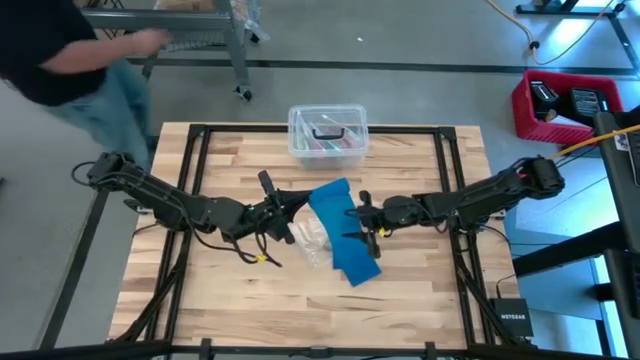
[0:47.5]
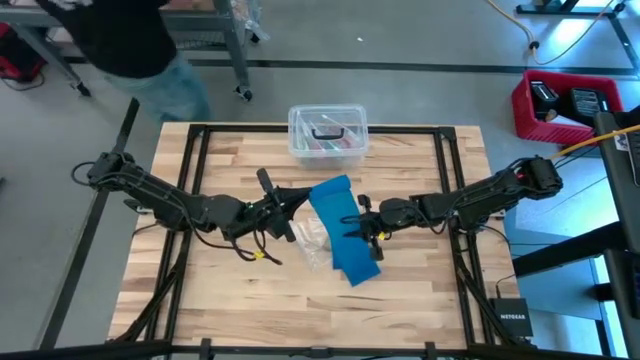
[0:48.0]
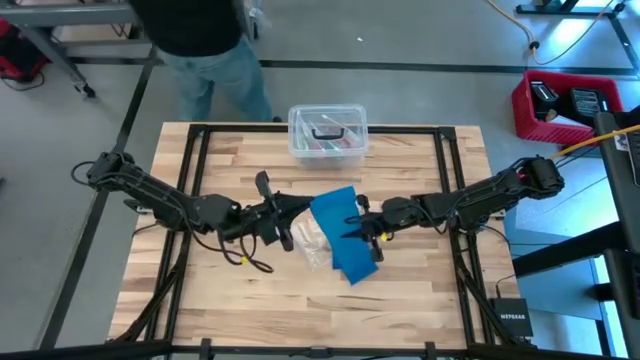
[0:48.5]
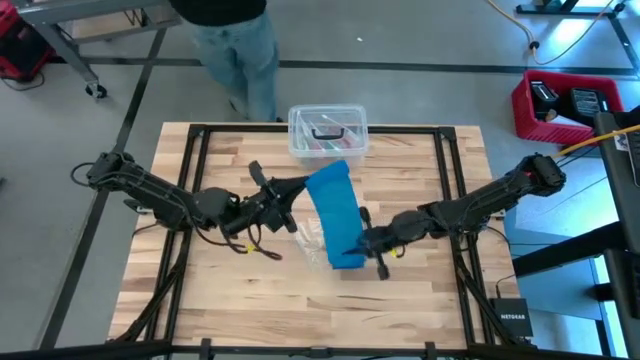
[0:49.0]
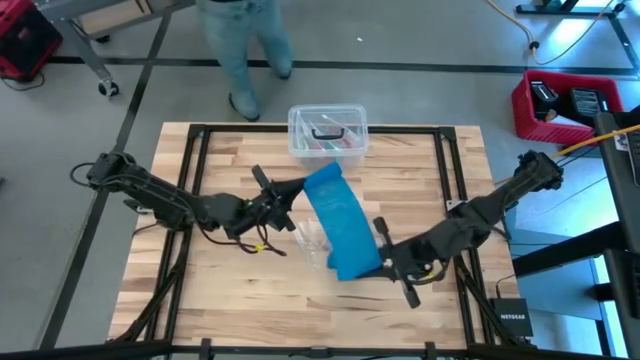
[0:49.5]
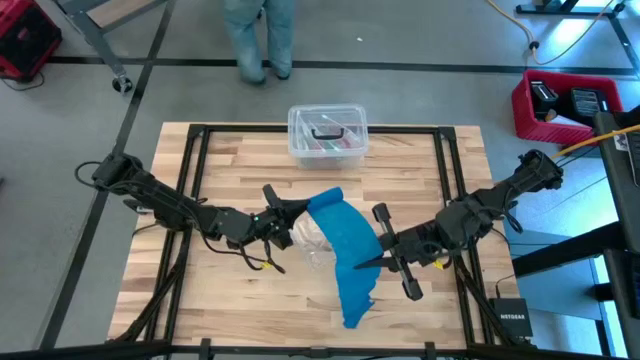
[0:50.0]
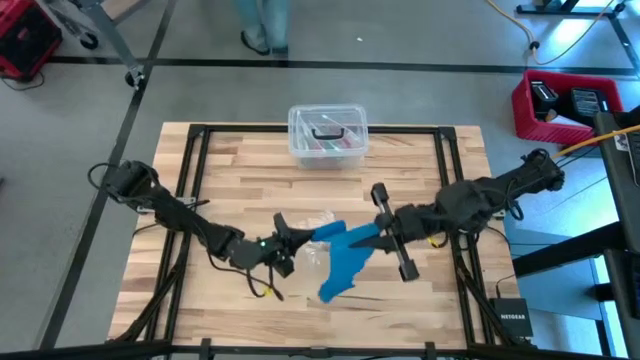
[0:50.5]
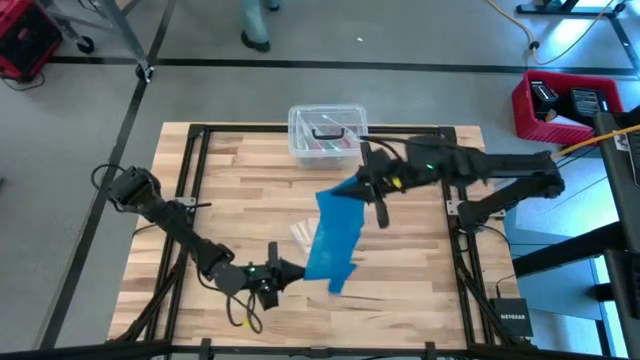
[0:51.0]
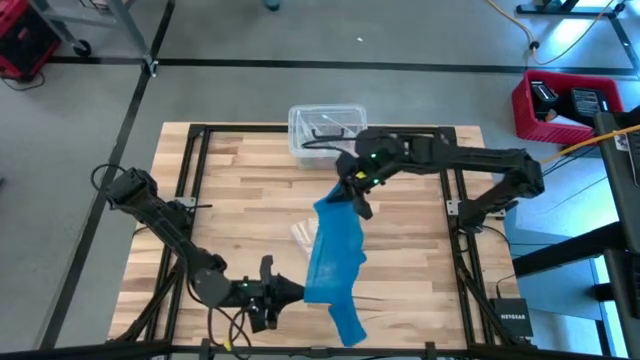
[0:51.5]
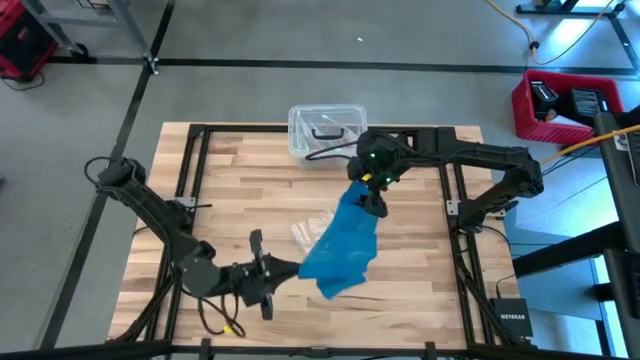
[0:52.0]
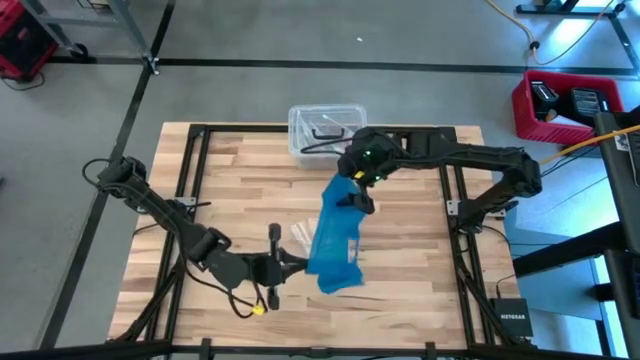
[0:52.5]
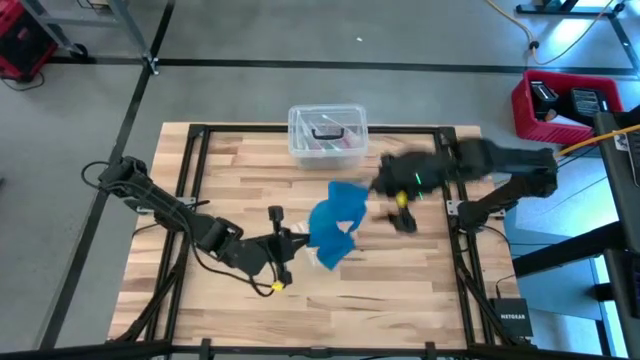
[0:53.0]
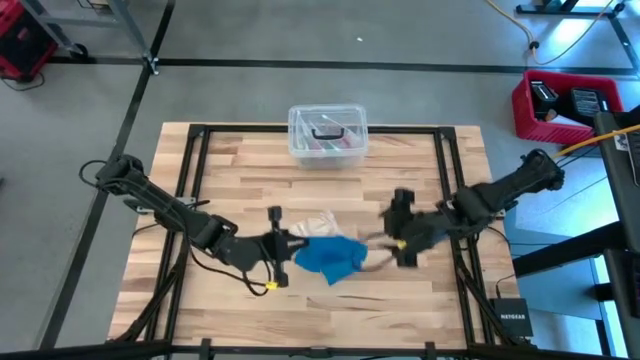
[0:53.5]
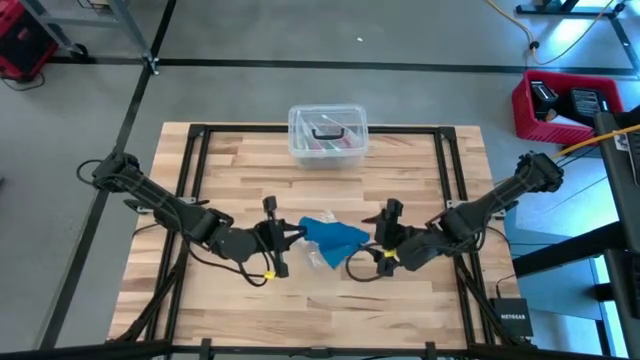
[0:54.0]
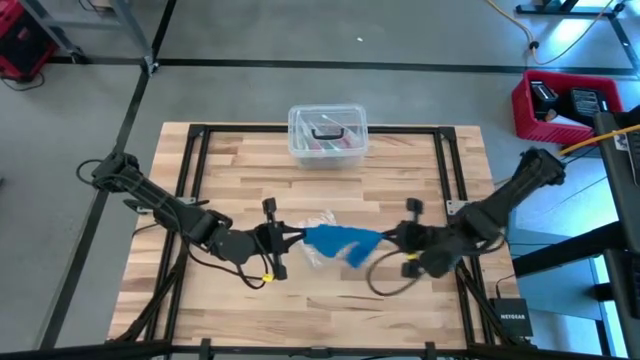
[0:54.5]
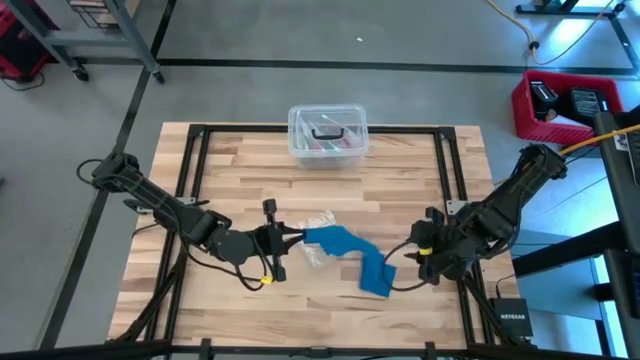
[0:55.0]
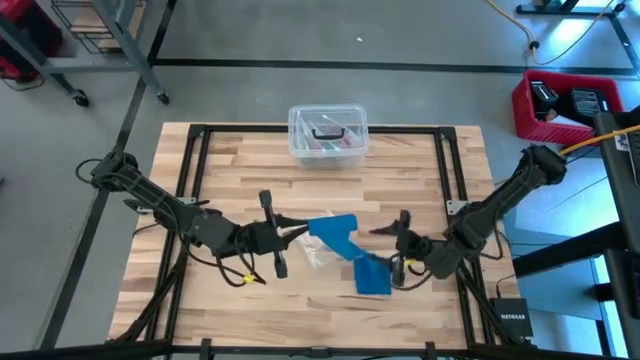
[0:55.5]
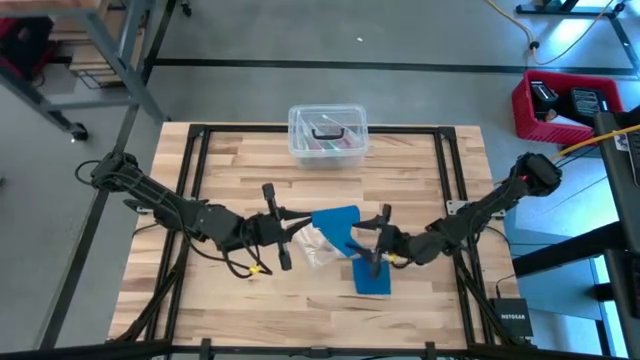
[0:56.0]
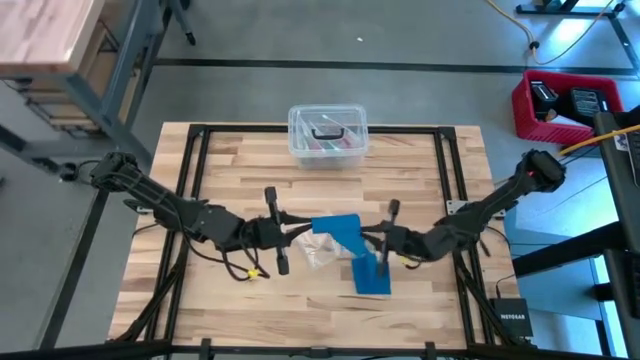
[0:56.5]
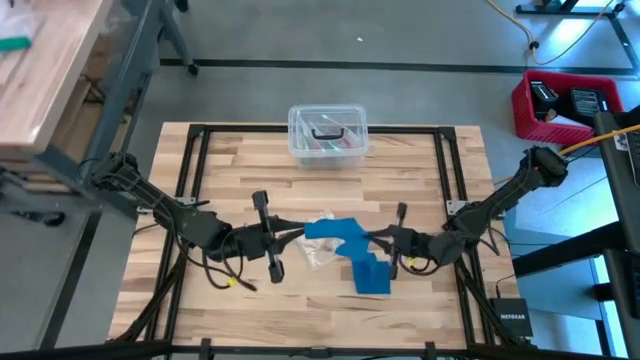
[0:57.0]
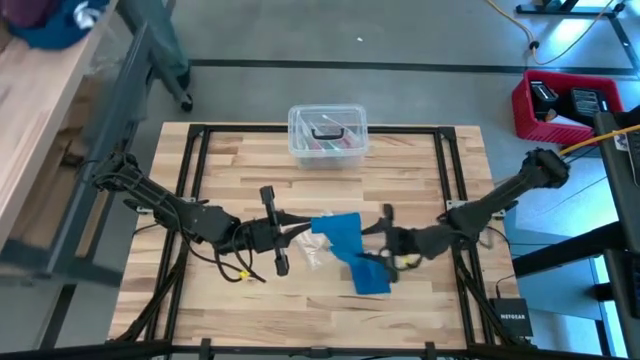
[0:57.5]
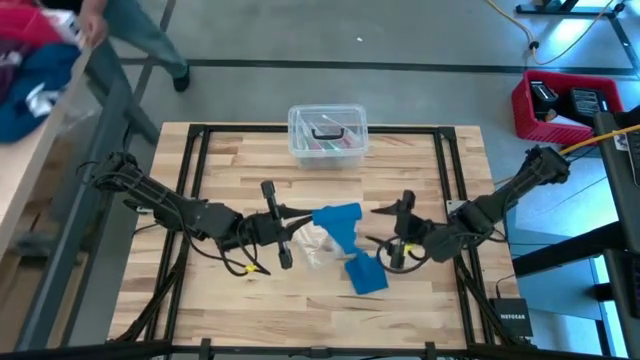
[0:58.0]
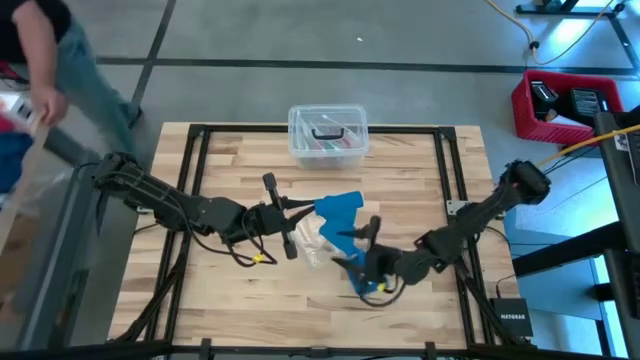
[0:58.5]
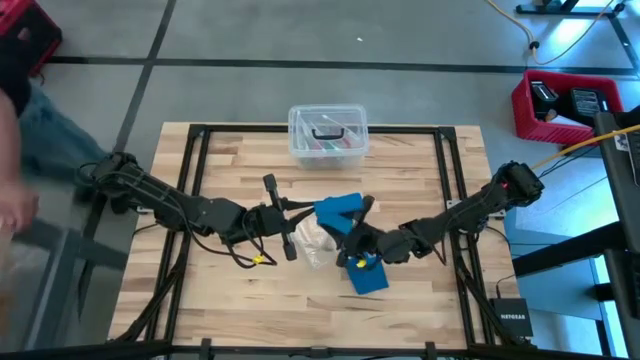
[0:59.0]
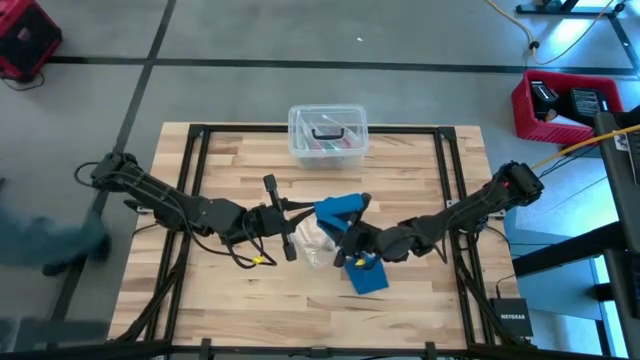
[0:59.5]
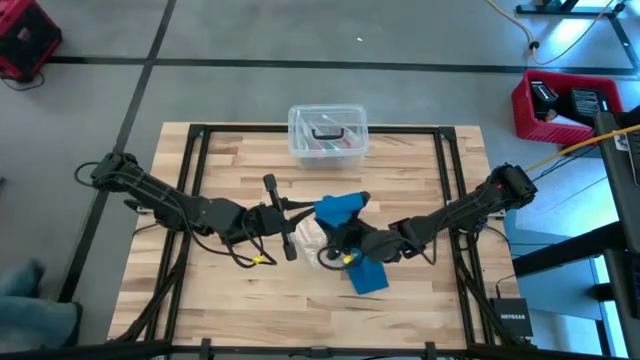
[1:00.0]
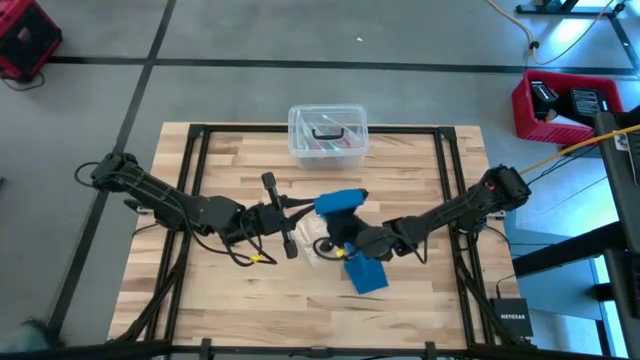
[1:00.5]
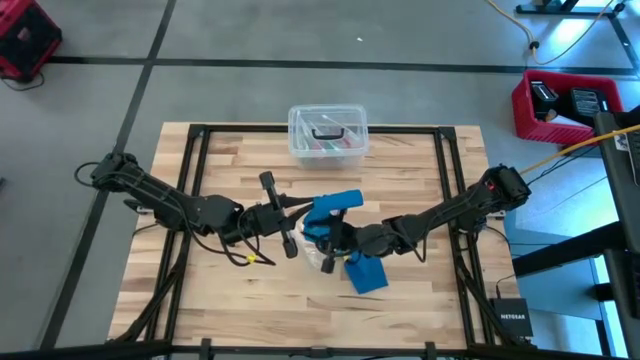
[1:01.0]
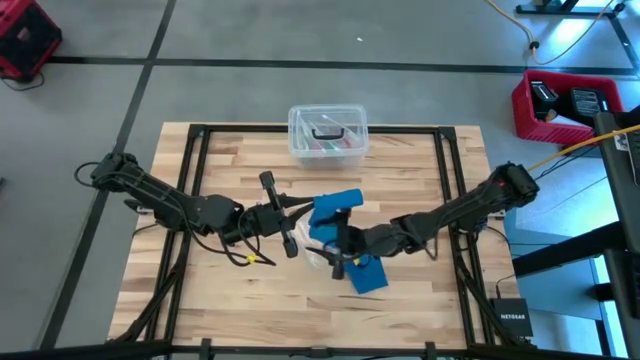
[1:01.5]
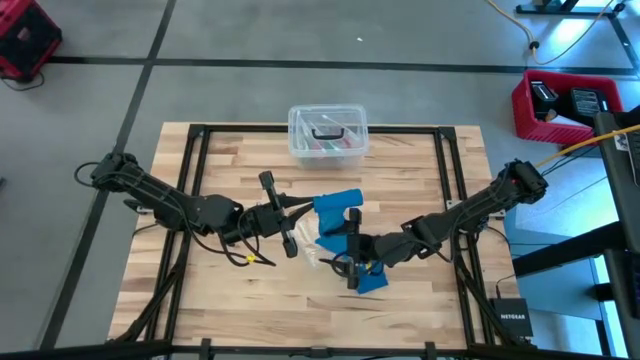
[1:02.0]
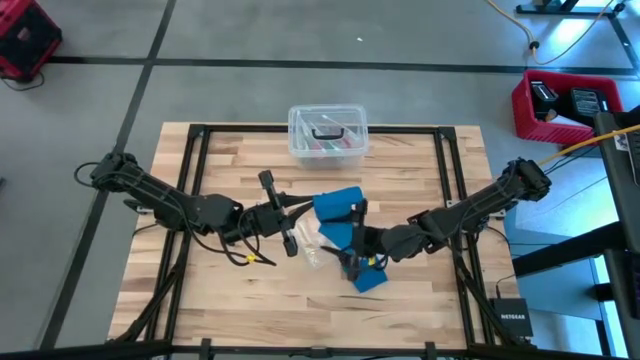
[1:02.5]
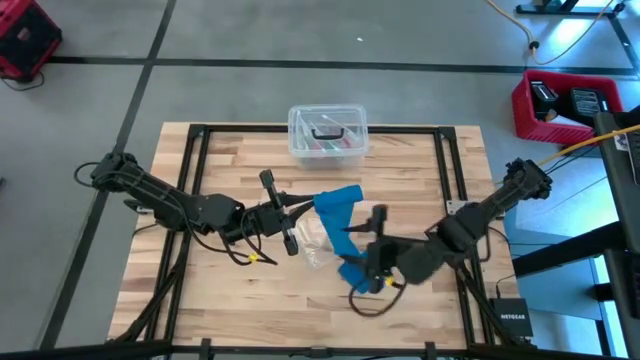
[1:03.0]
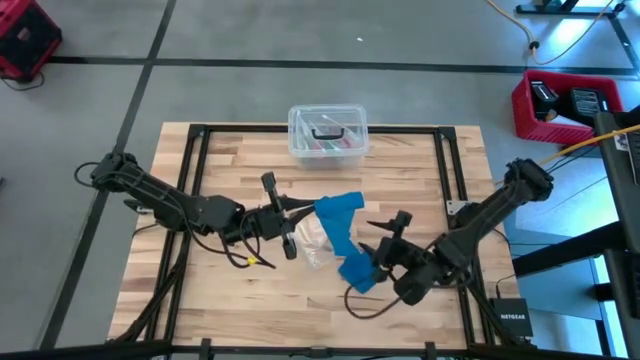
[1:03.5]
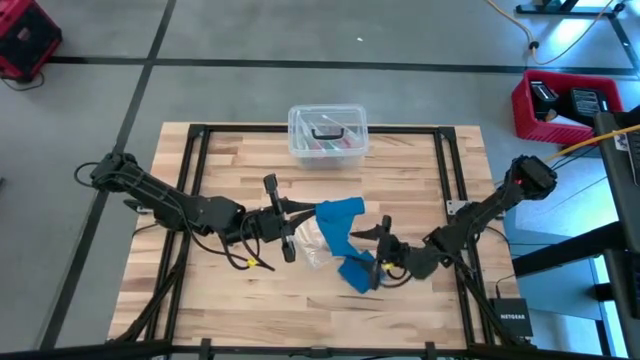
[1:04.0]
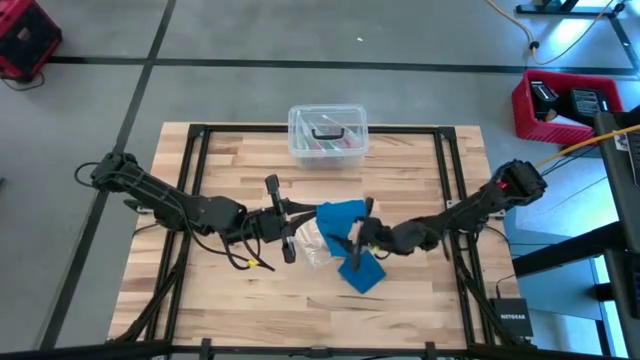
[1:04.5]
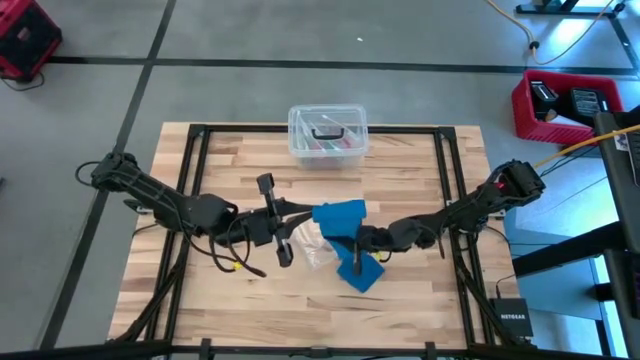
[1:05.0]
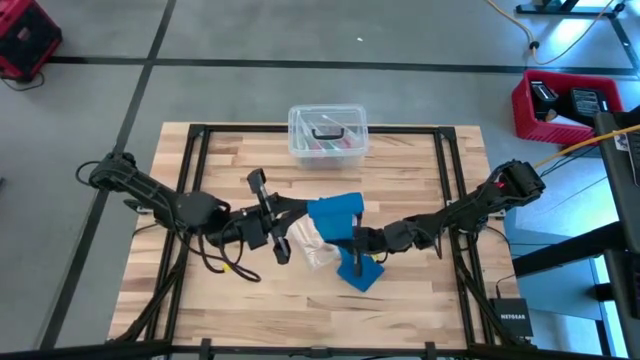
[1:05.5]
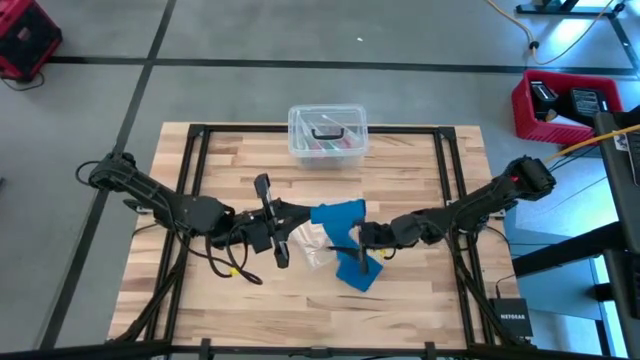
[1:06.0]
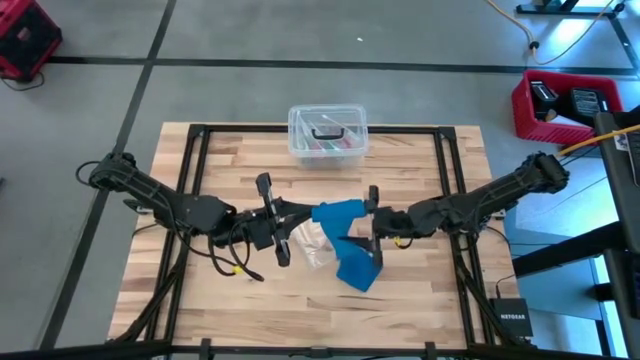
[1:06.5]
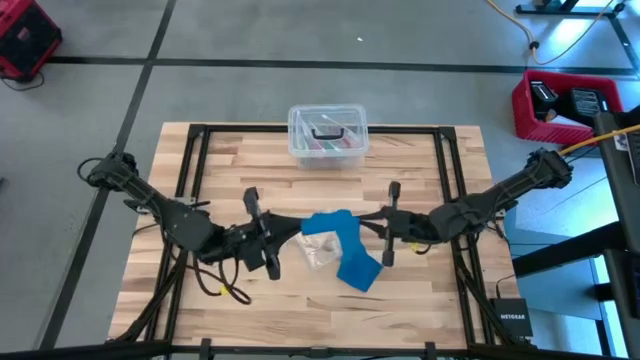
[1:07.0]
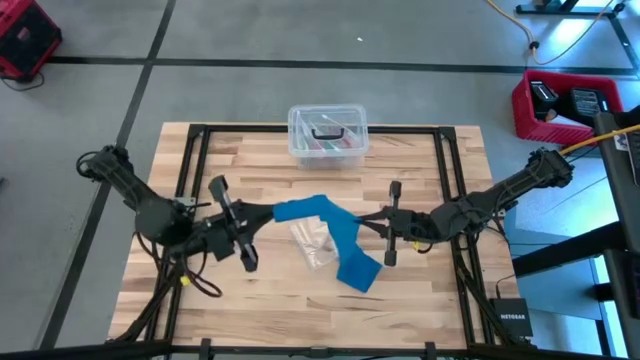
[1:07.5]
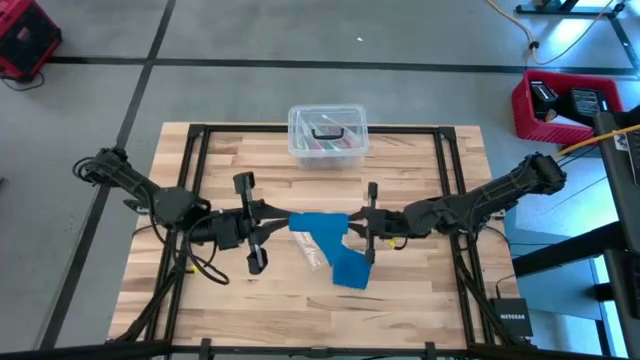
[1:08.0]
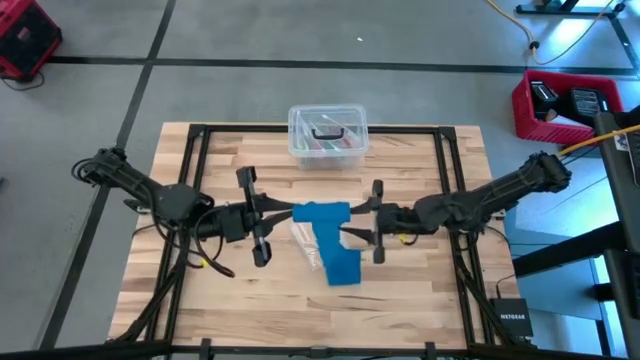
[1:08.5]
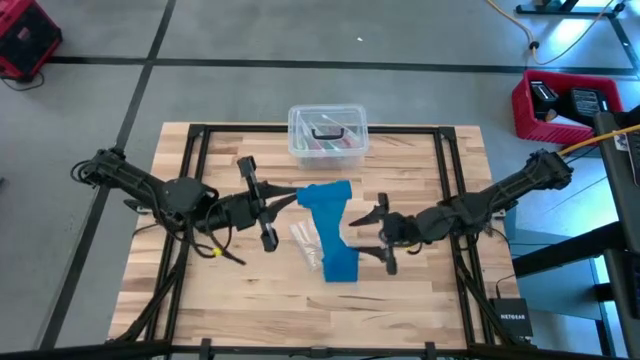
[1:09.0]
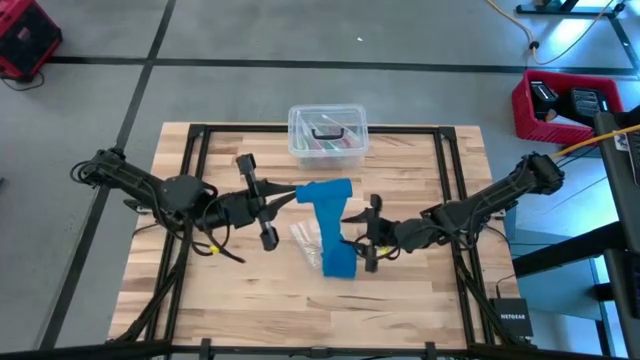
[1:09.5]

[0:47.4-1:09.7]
Task: Roll bandage
Roll the blue bandage
